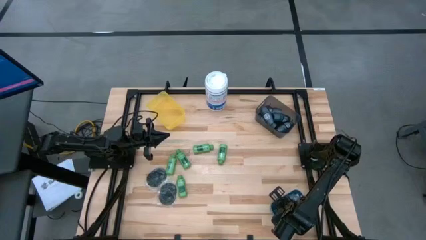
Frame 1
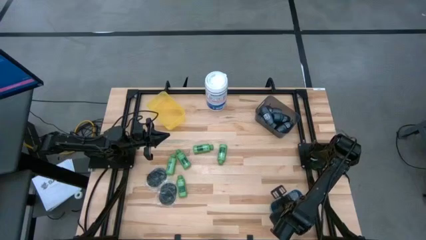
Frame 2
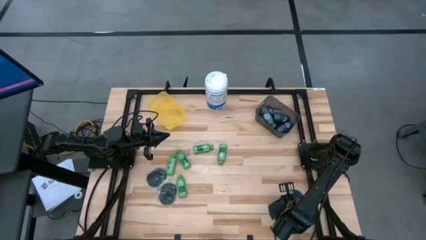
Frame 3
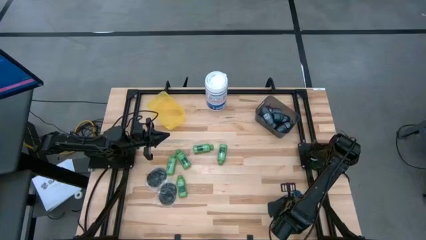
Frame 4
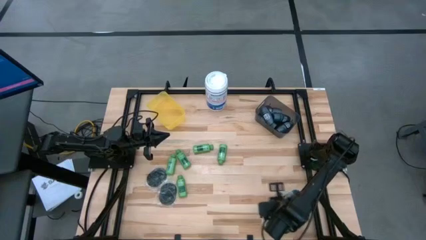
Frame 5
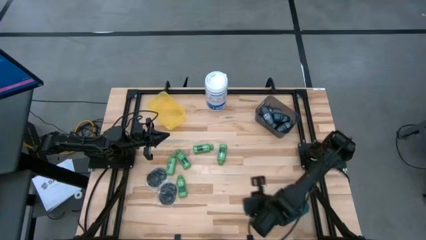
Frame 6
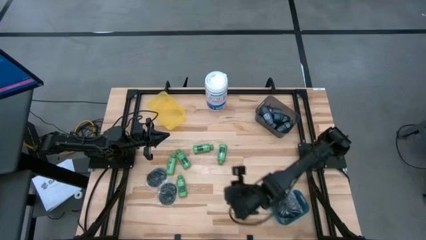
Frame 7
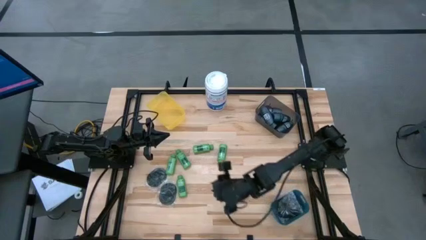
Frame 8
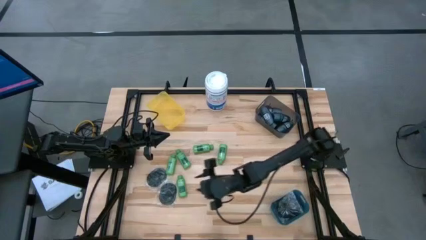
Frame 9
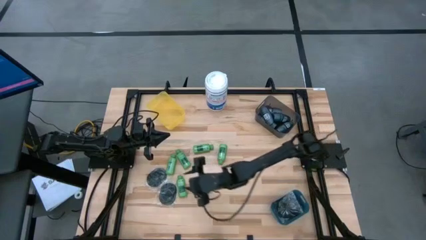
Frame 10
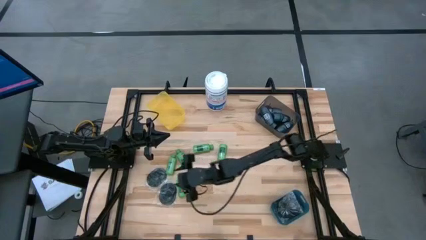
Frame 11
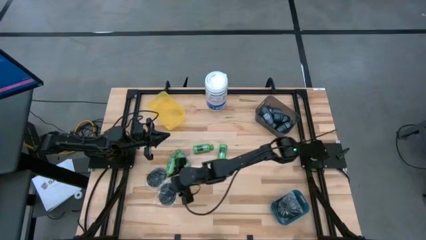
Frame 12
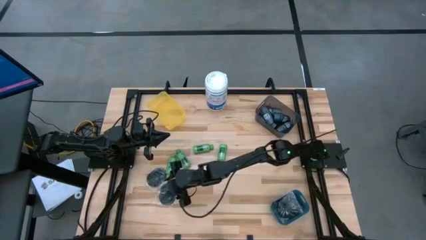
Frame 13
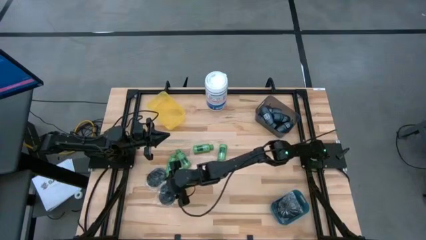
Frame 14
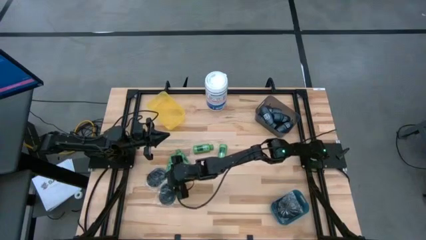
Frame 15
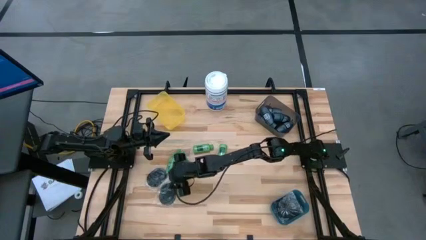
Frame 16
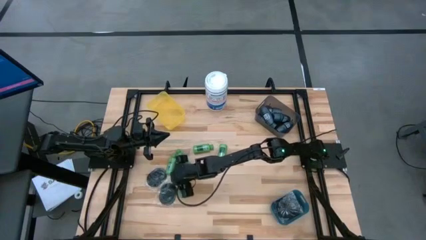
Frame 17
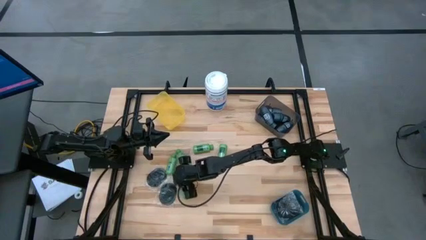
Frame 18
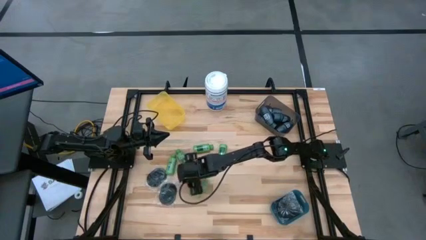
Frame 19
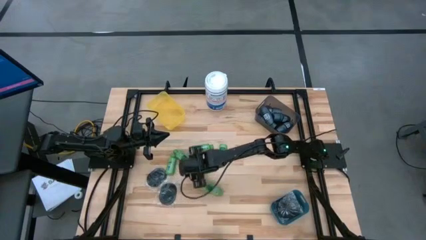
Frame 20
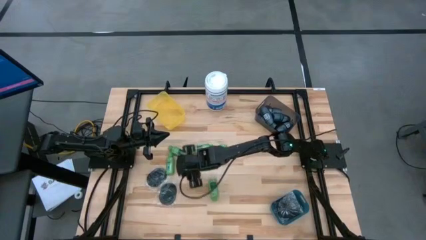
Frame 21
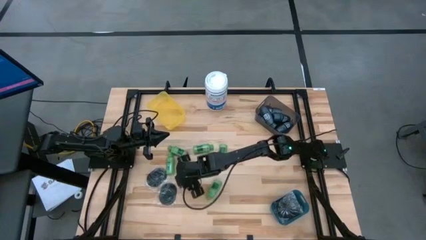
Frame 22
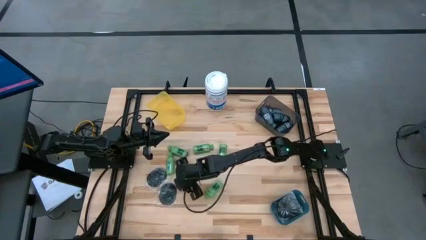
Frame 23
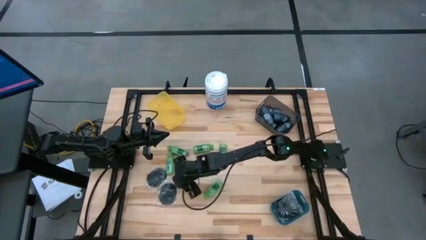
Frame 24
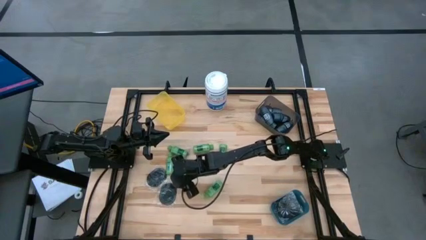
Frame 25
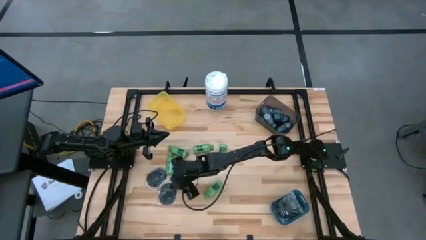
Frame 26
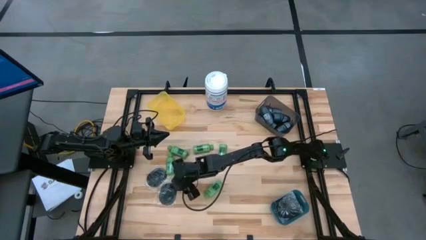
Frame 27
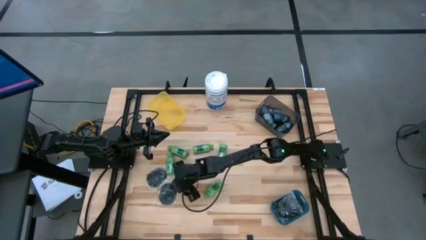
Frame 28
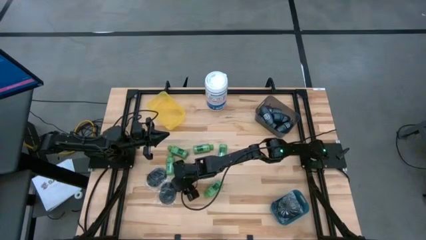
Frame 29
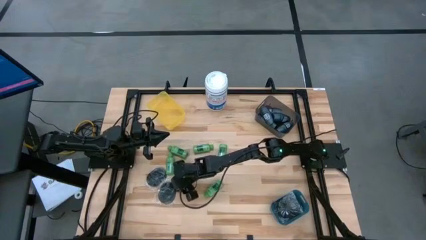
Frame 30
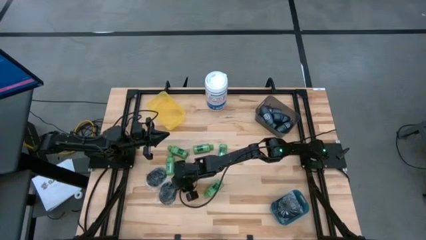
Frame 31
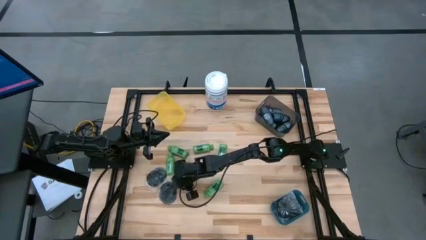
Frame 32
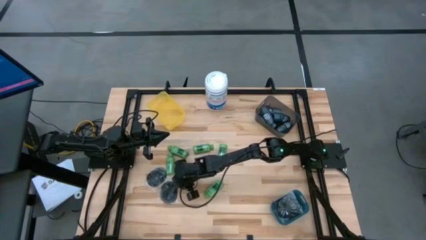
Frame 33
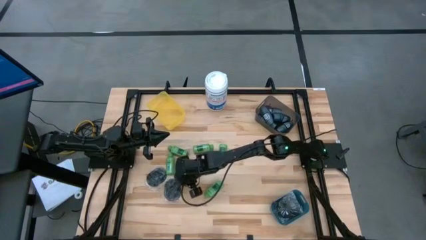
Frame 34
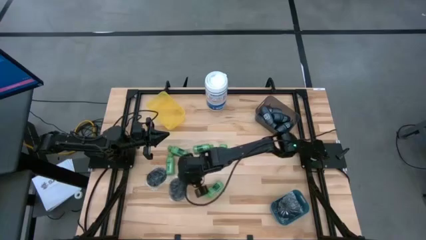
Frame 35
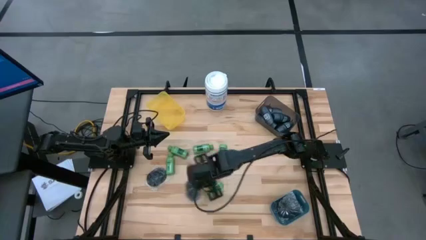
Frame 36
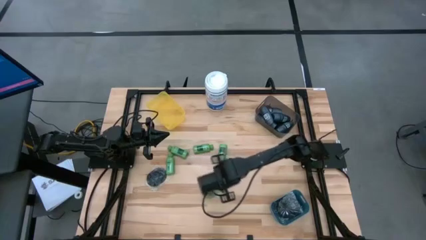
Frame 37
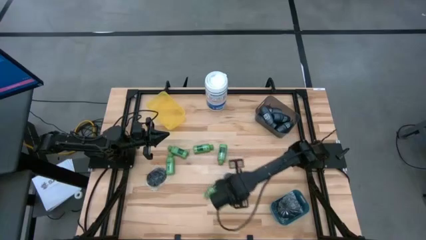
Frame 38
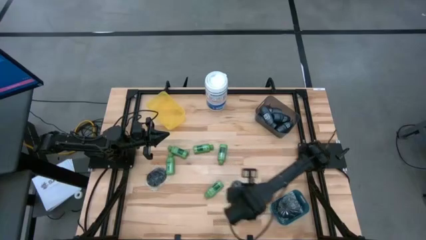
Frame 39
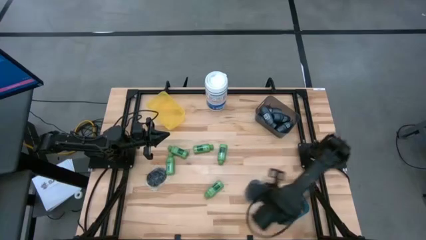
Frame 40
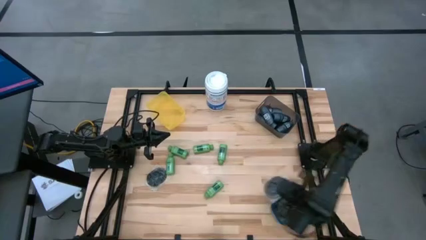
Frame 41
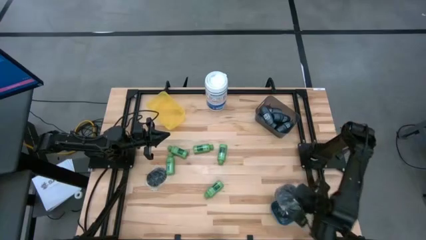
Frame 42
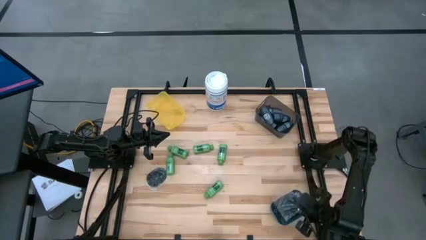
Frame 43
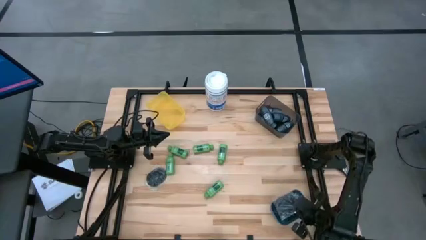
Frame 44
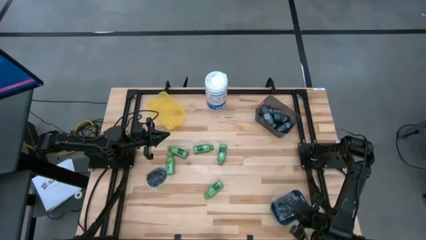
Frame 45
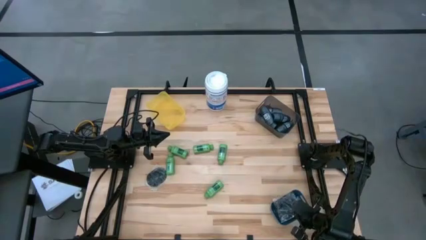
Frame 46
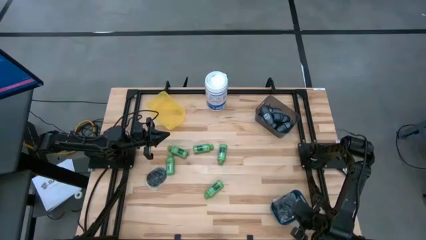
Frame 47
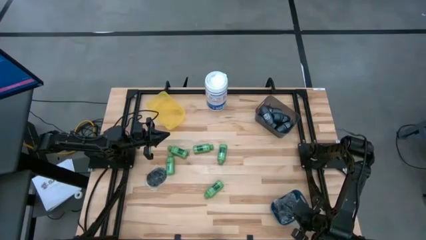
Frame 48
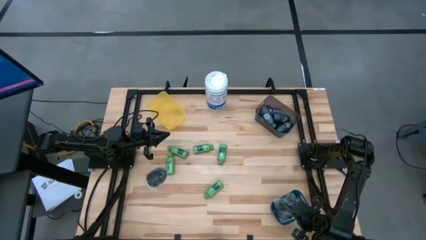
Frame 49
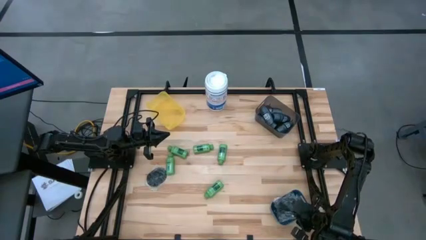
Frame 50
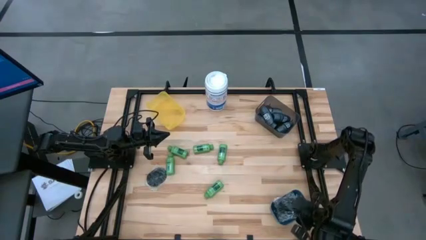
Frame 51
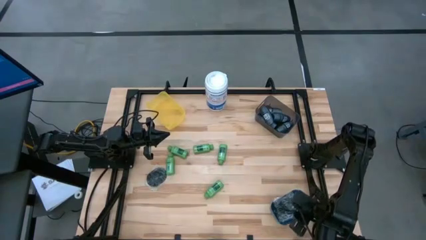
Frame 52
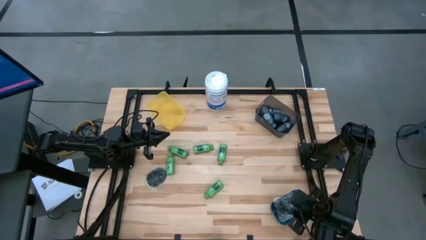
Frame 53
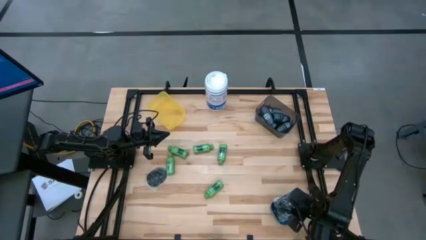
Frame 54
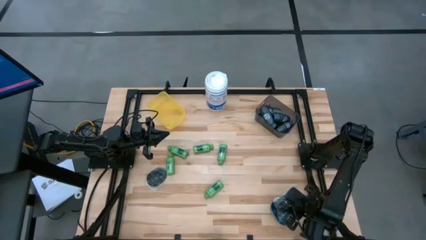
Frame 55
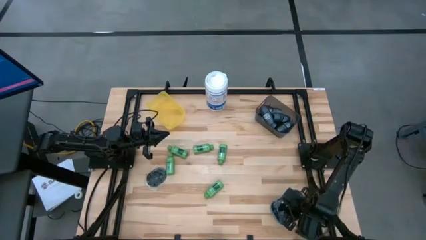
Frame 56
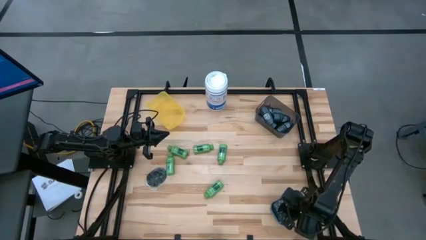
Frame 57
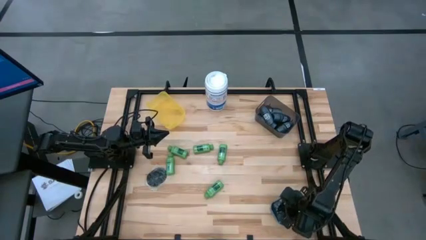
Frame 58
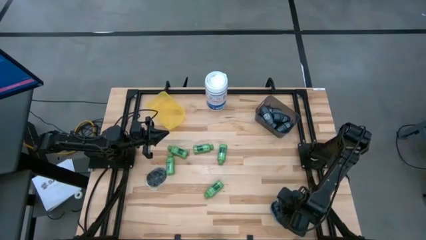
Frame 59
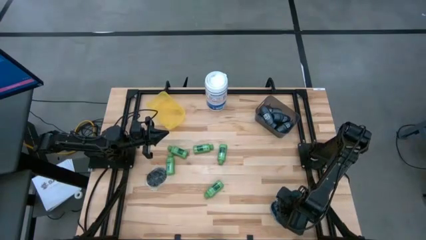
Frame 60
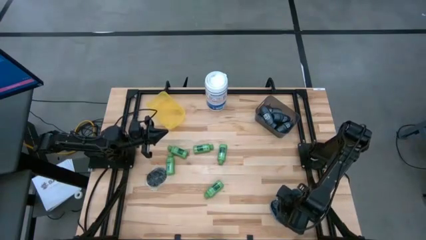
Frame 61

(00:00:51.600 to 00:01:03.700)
Task: Pick & Place Travel size toiletries
Put the black hairbrush into the blue bin
